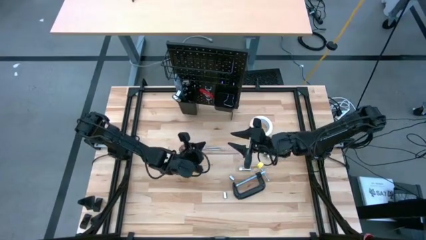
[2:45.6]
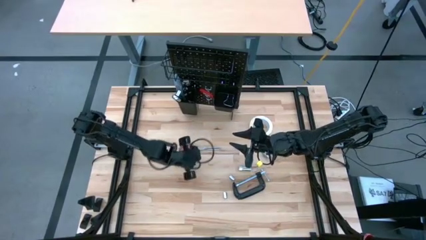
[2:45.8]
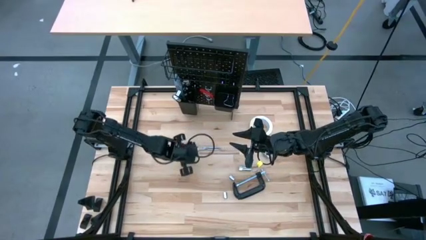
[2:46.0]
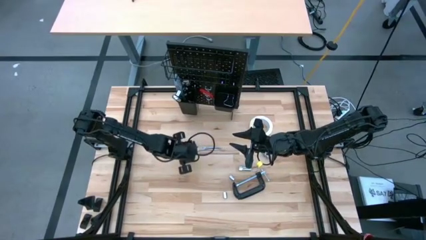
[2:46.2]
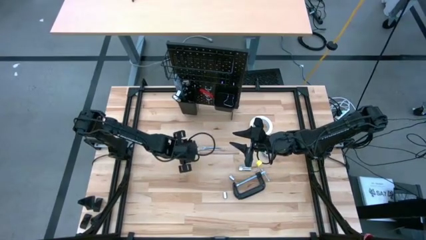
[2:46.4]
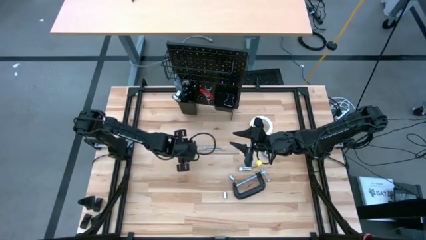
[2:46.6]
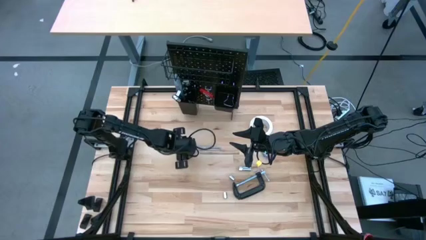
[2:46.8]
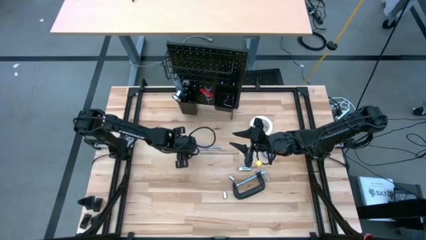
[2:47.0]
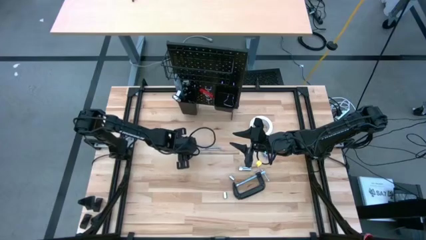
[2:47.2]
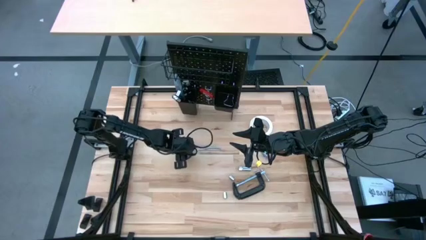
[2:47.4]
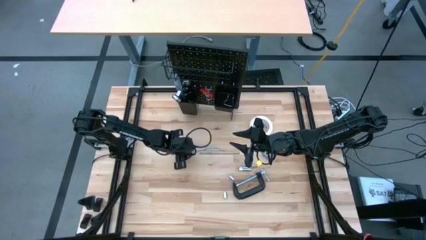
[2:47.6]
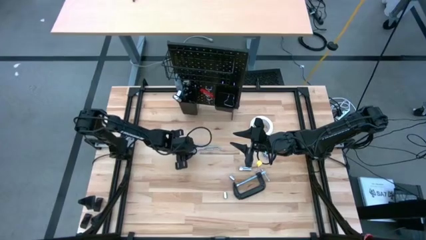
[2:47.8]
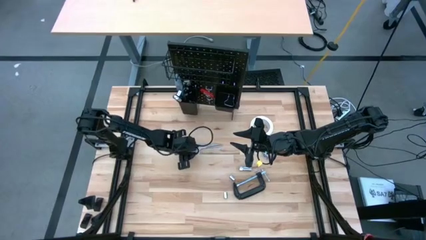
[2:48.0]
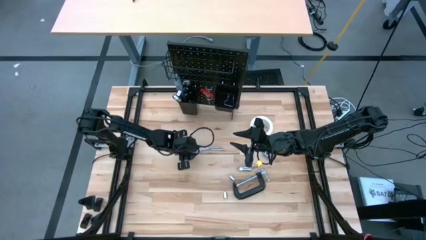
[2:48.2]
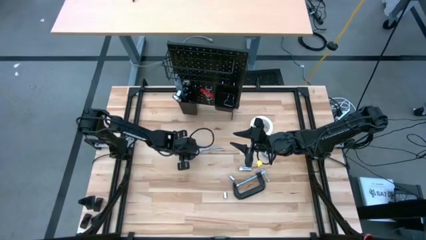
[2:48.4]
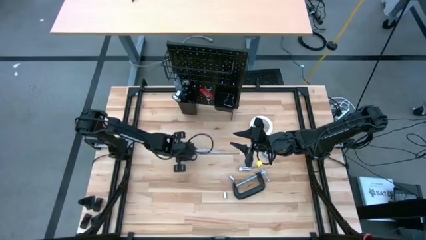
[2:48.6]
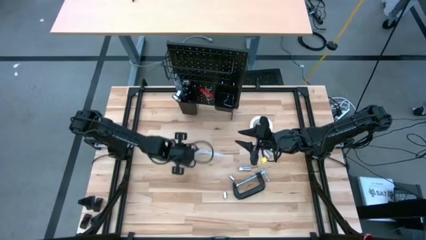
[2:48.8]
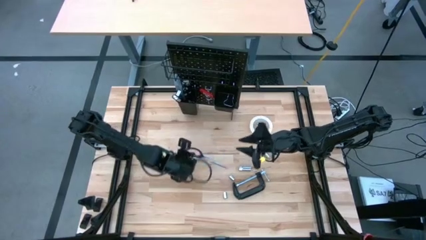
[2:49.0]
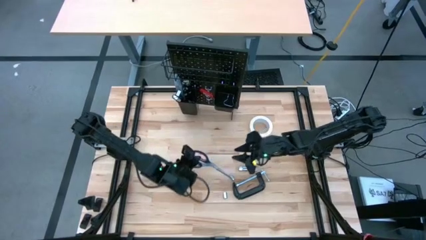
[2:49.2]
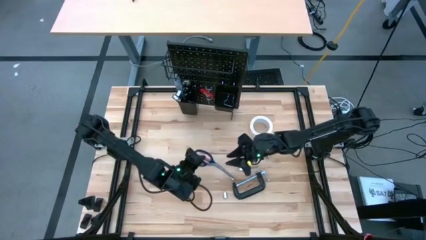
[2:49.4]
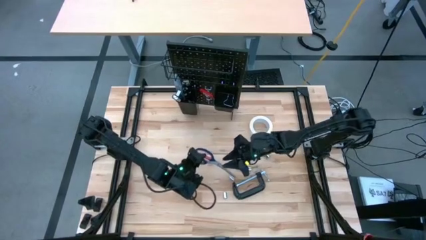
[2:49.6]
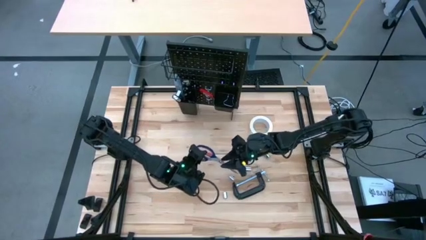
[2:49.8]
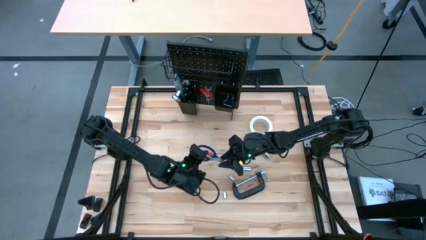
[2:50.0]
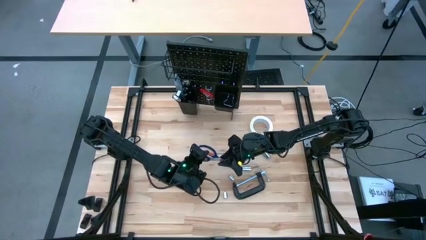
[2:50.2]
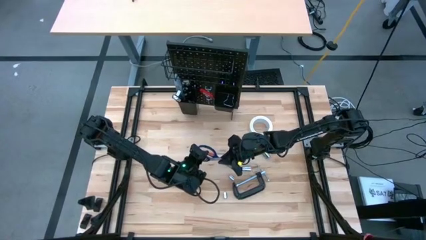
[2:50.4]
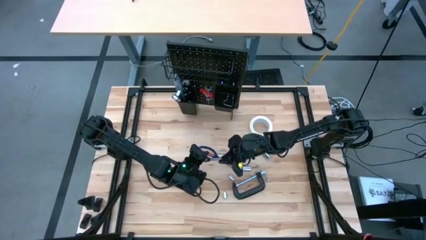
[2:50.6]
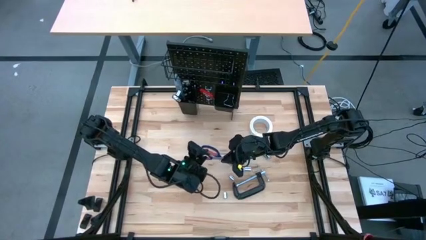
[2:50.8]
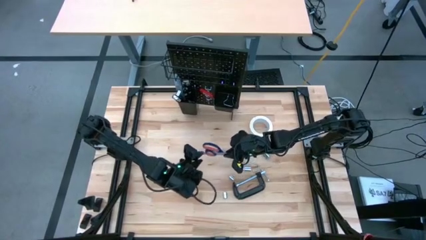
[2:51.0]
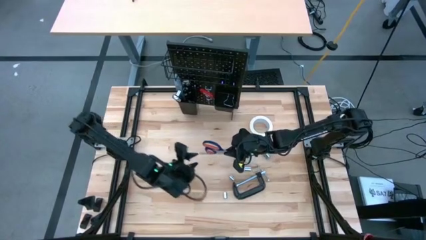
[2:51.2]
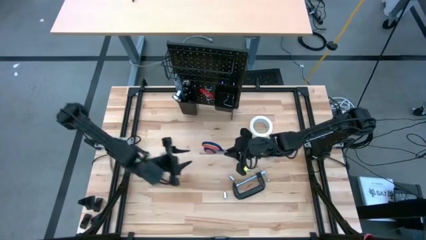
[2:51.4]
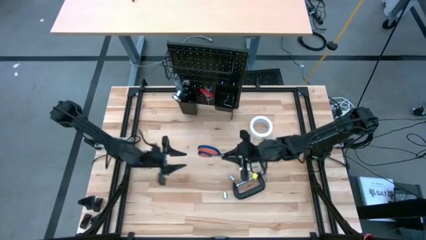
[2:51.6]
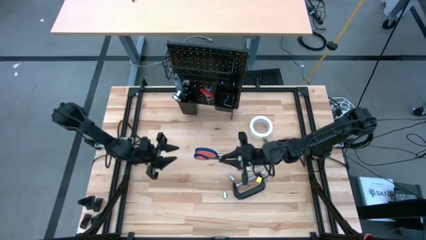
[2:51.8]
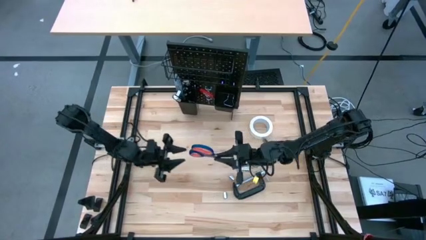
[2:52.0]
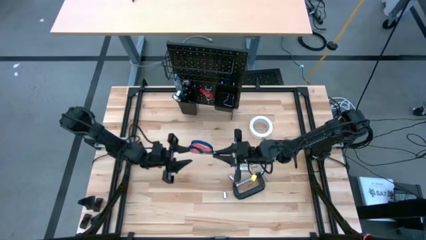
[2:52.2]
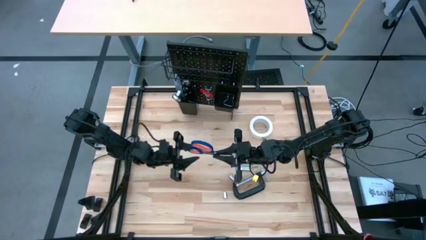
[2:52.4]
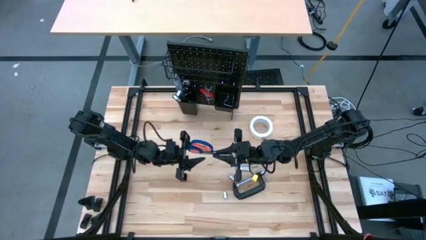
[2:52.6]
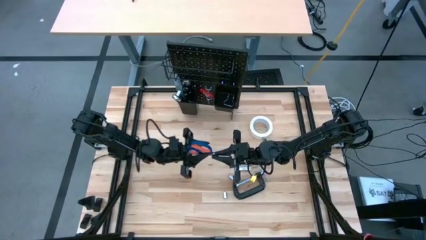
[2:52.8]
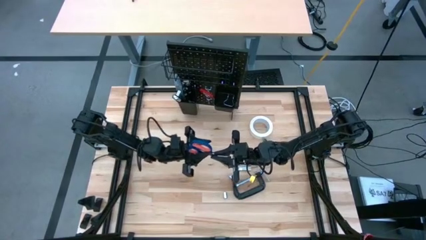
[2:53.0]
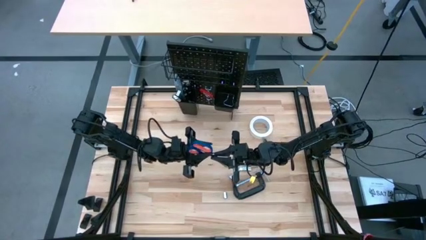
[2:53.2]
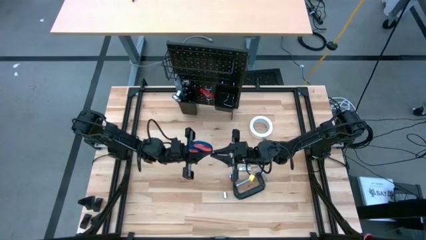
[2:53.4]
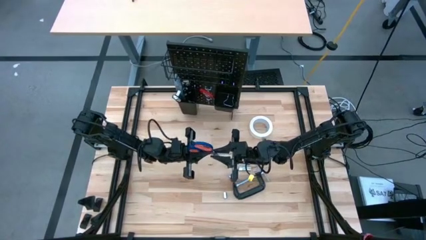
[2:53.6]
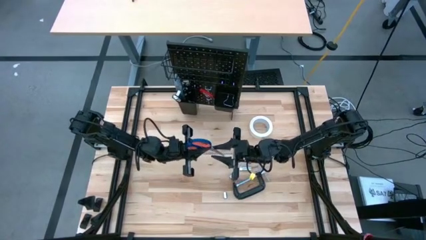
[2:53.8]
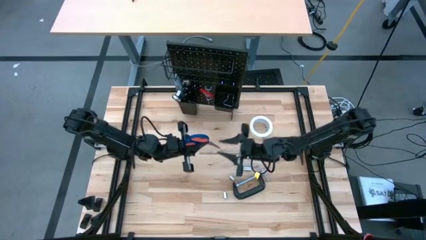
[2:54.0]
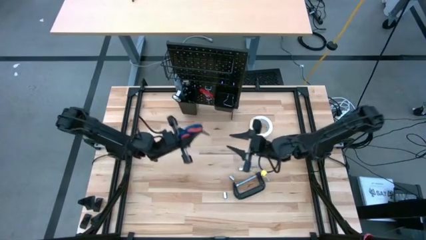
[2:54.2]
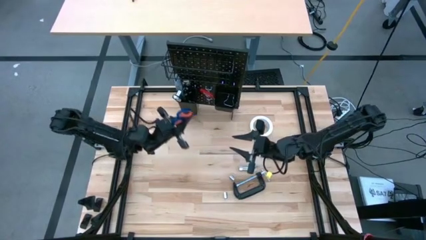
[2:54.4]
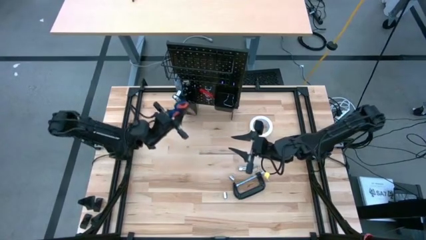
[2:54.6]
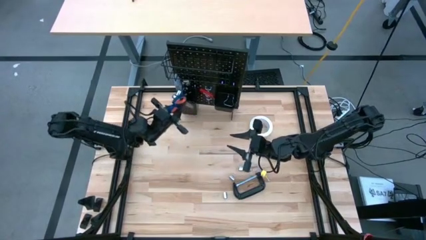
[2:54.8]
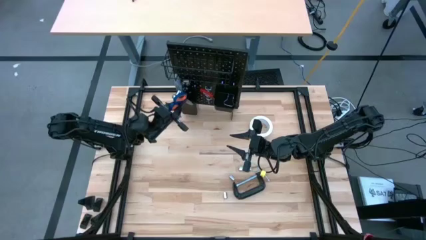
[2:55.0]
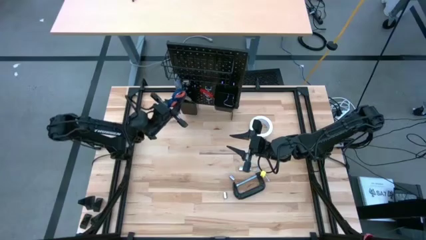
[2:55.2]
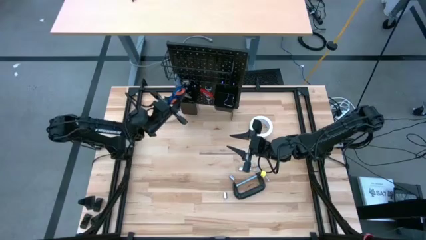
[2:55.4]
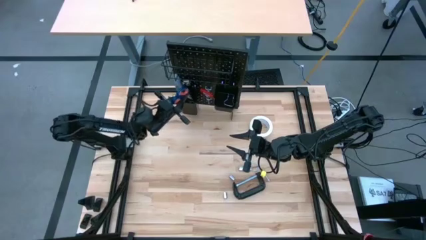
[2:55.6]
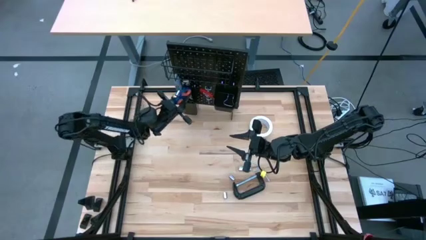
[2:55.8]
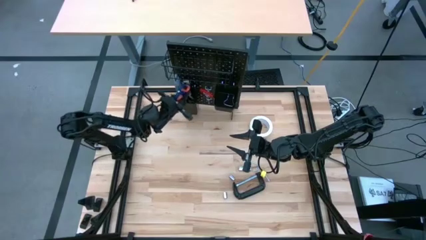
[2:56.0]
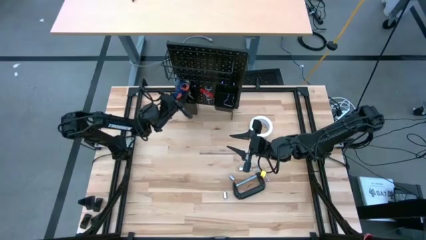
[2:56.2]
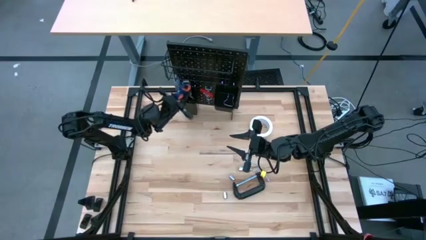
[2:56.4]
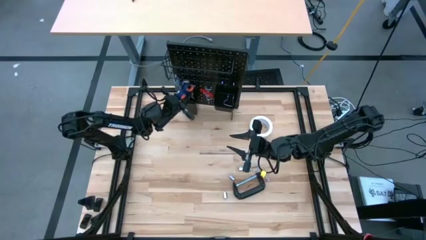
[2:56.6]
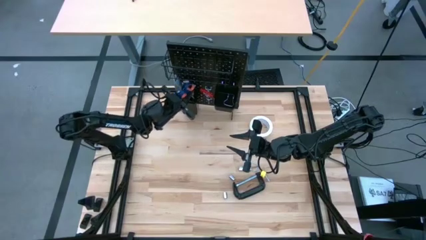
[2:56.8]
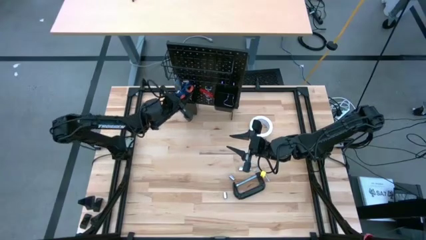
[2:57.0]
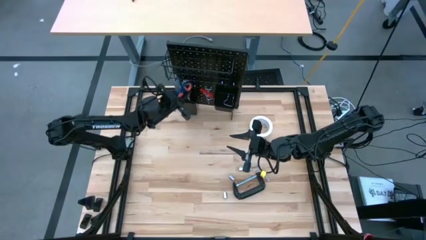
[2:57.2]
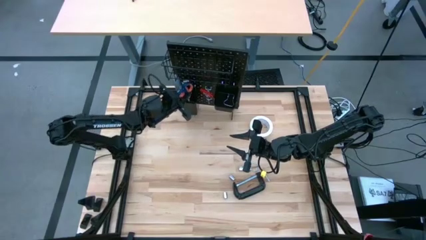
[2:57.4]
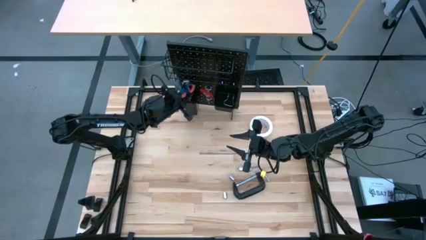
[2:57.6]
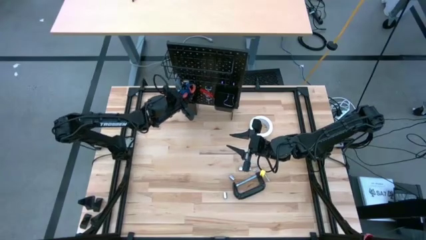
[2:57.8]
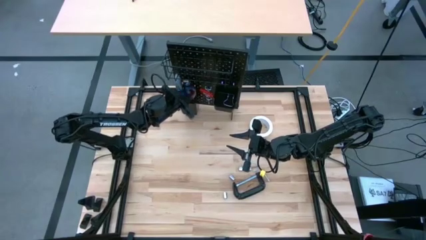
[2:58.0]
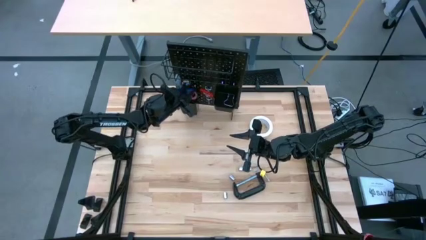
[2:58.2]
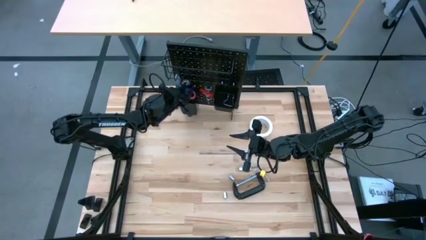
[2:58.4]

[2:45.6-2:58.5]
Task: Hang tools onto peg board
Put the blue scissors into the left black bin on the peg board
